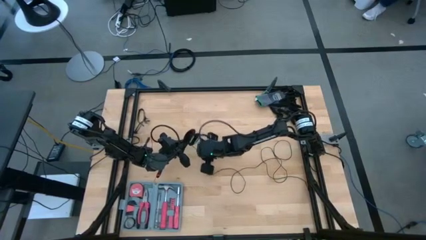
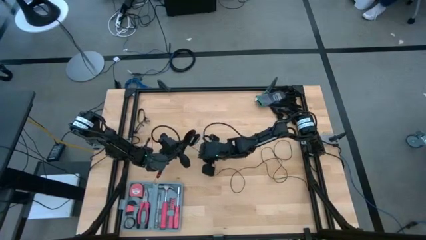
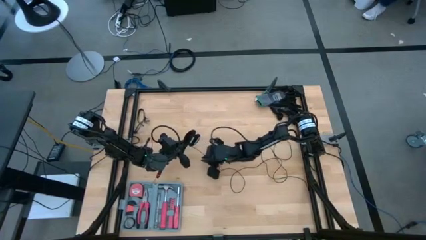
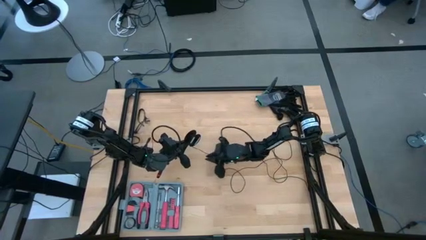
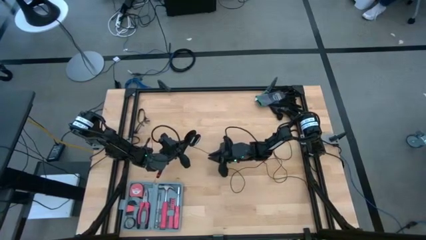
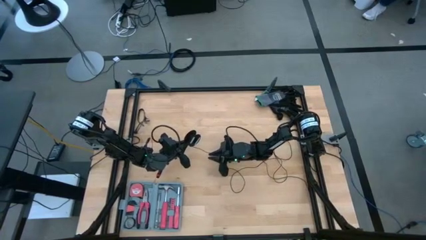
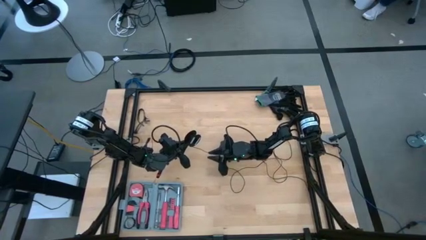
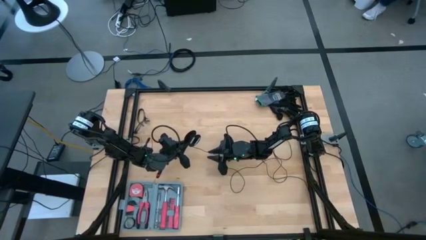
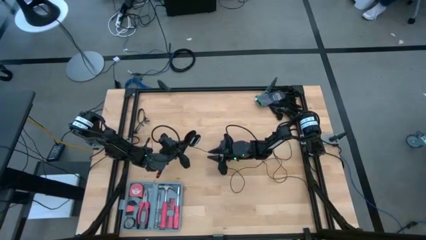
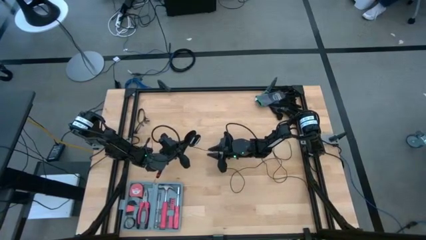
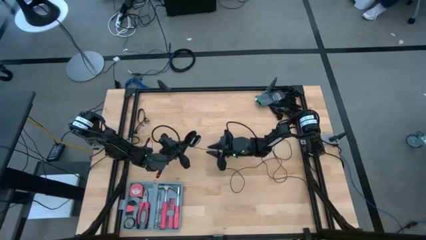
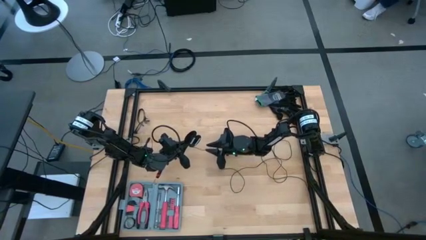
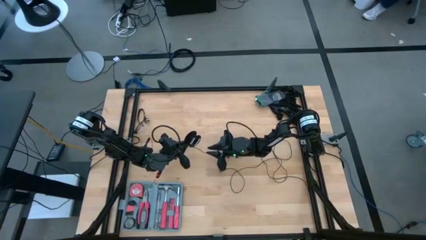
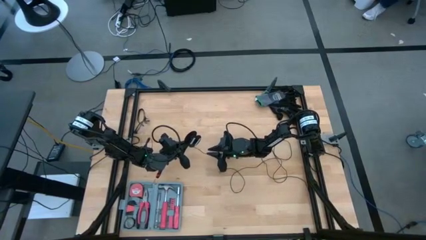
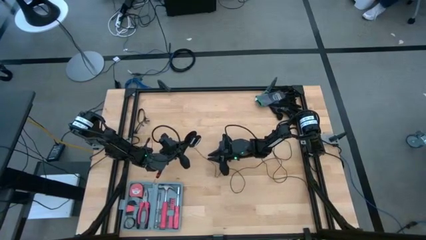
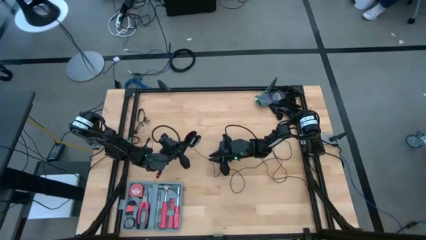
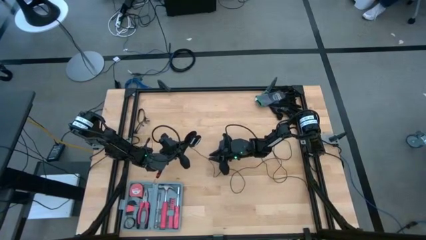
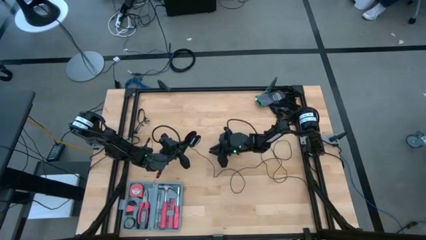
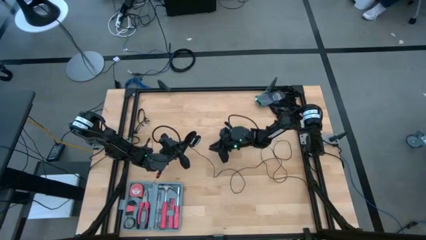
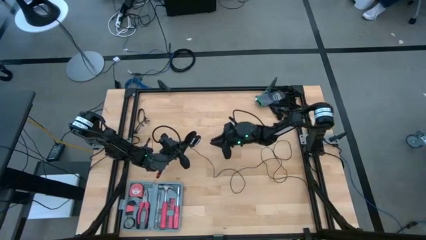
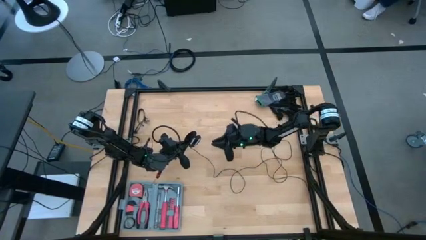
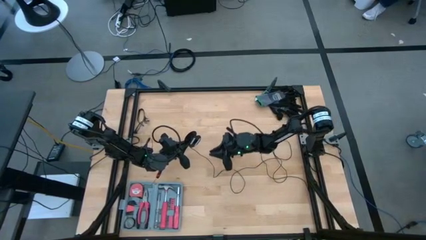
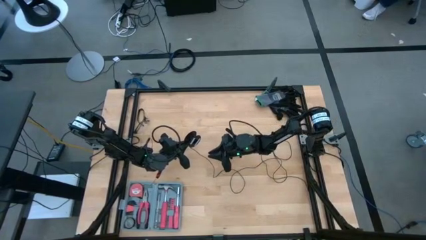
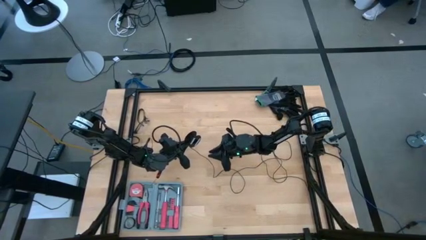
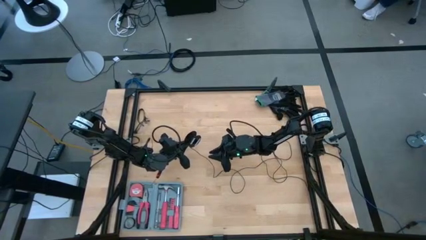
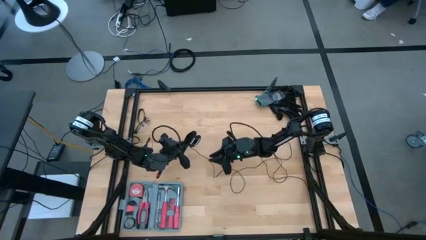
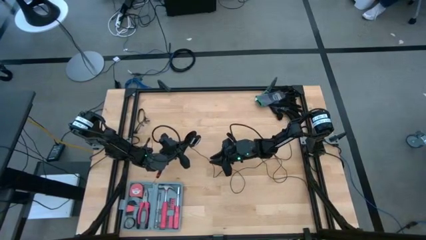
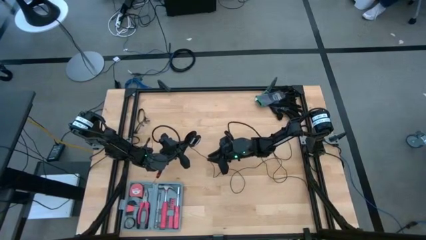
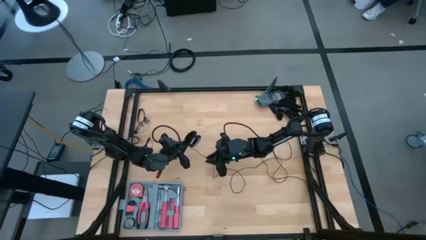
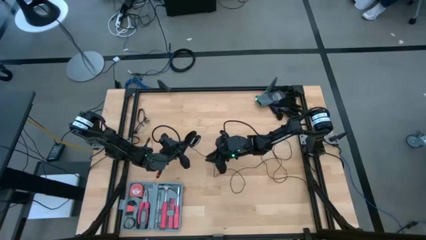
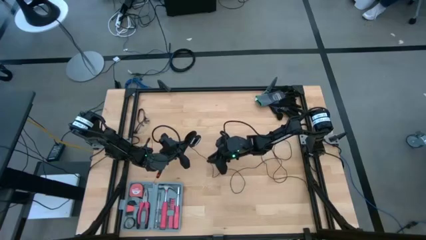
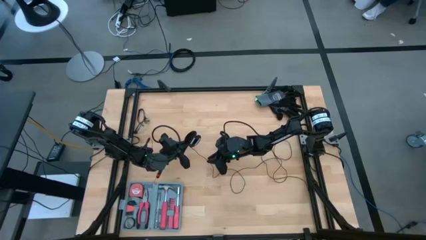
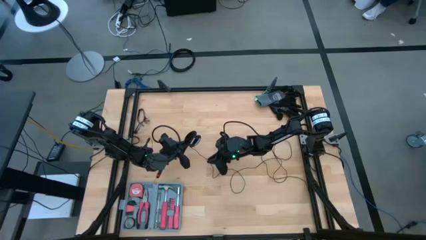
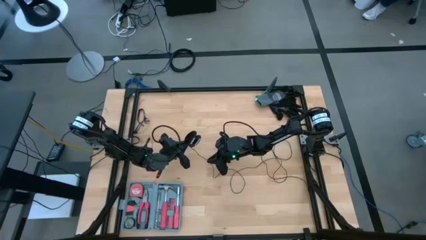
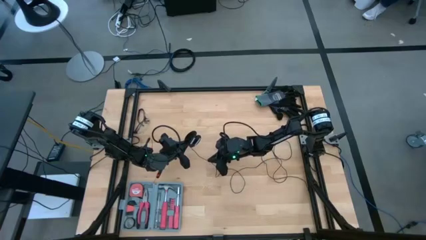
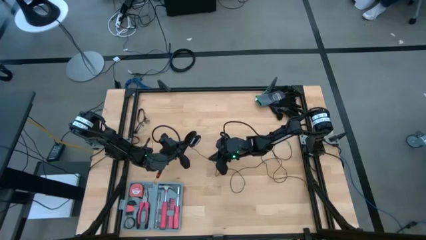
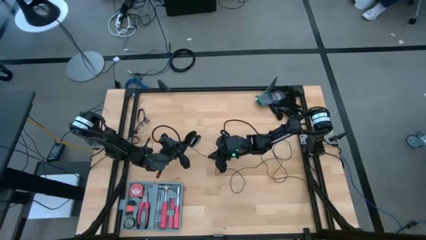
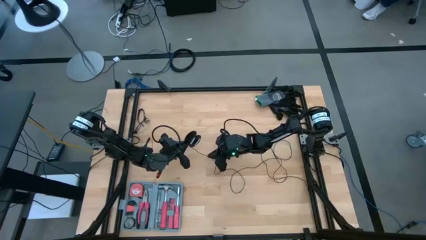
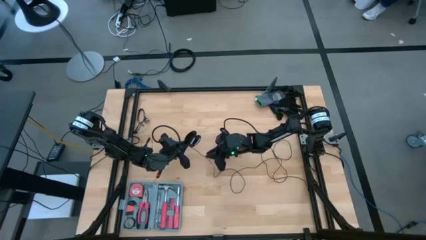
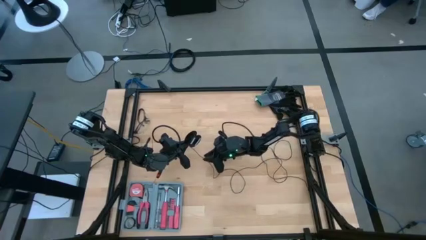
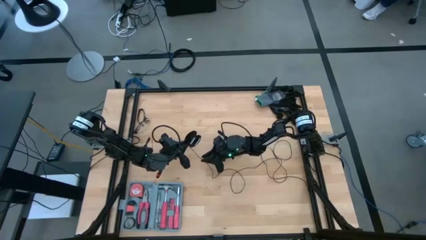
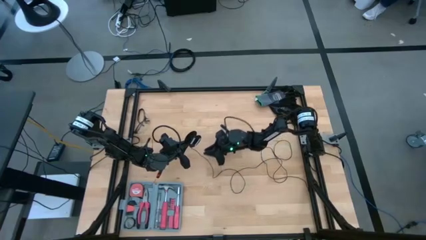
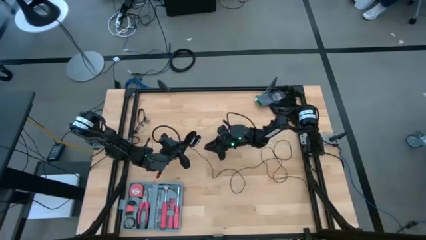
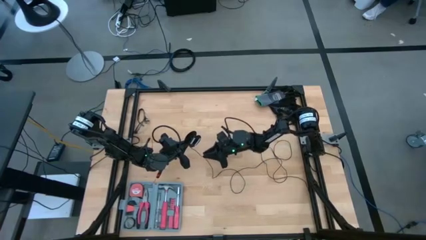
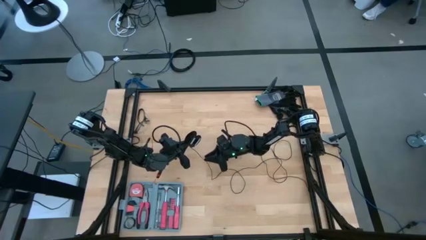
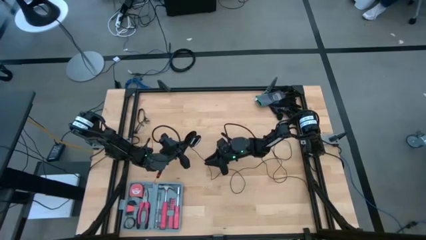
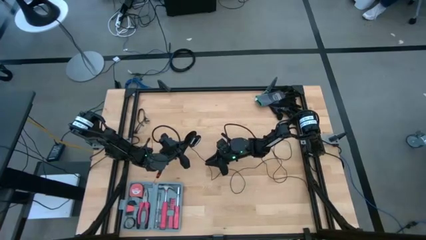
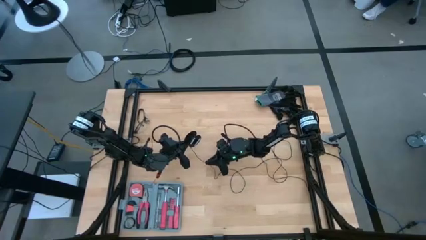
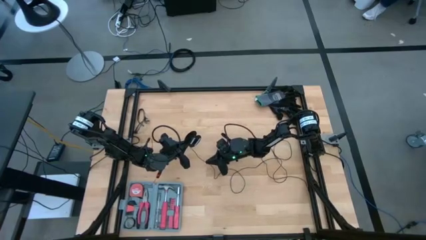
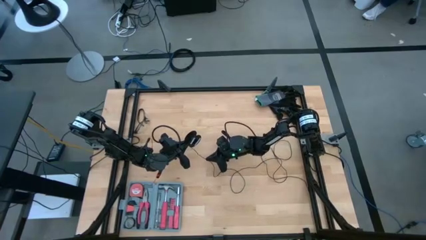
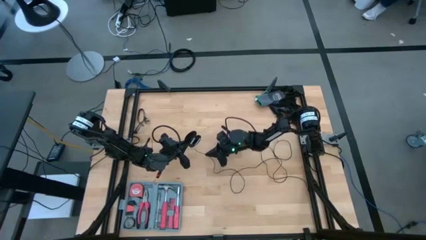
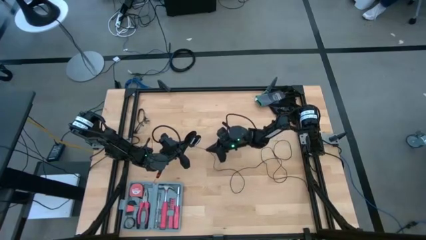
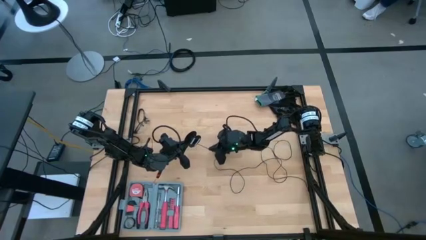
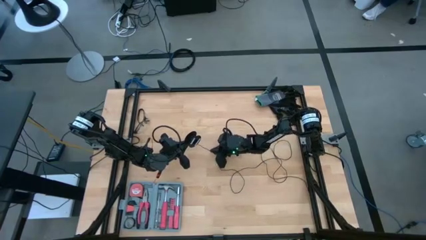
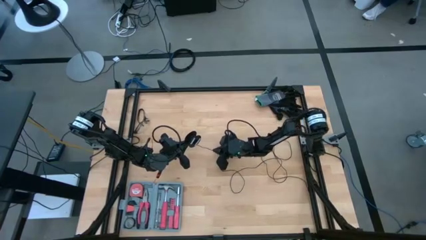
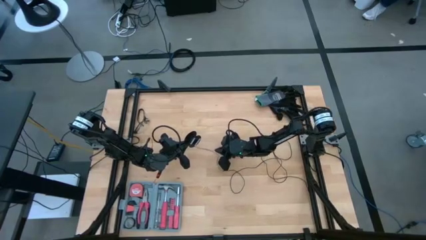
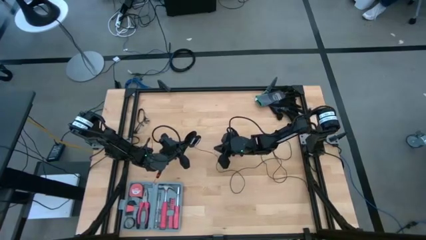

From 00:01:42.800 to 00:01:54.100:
Task: Coil cords
Coil the black wire onto the spool
